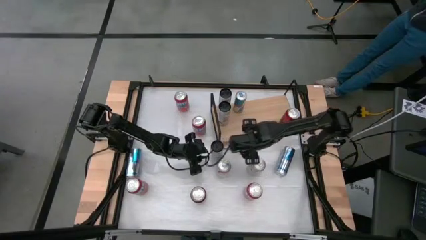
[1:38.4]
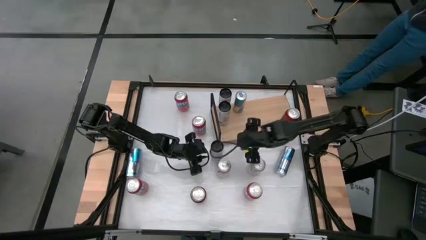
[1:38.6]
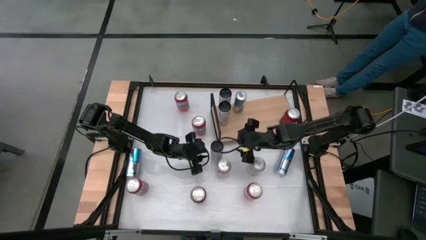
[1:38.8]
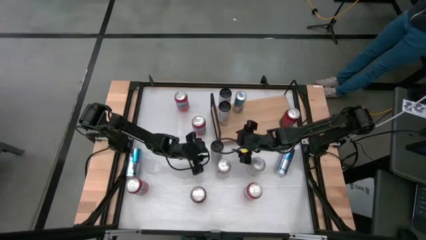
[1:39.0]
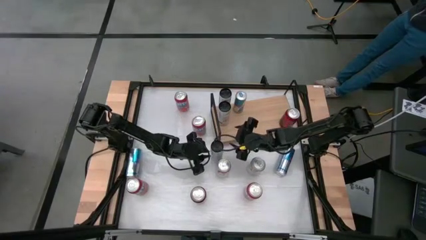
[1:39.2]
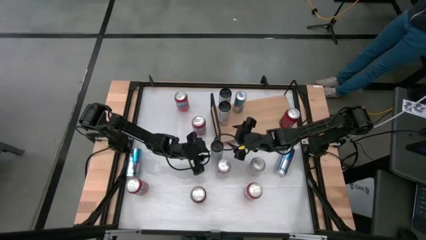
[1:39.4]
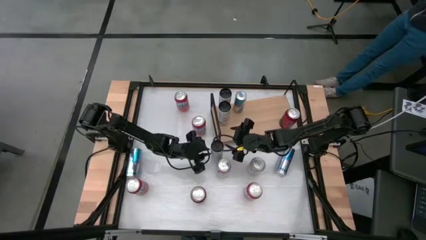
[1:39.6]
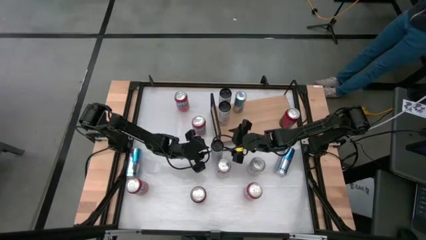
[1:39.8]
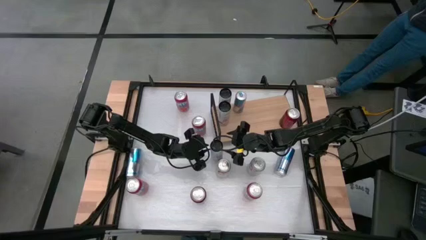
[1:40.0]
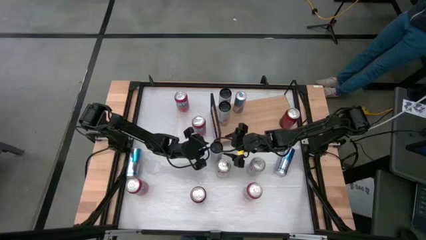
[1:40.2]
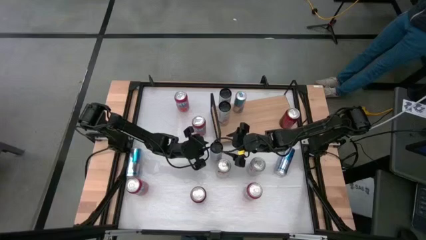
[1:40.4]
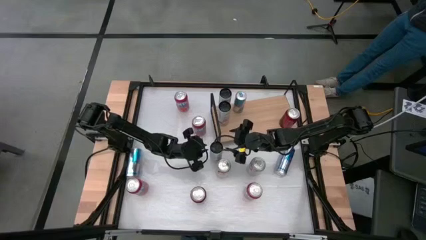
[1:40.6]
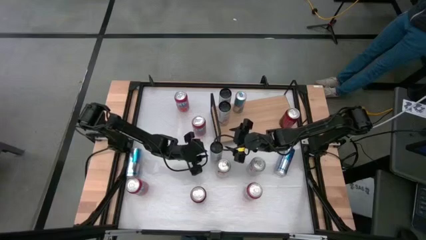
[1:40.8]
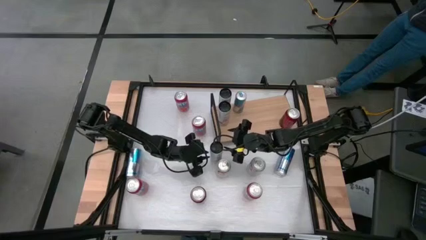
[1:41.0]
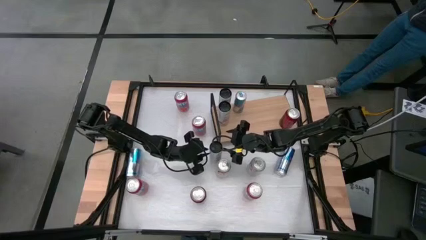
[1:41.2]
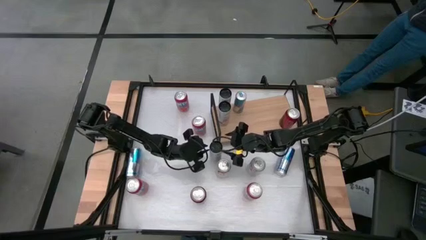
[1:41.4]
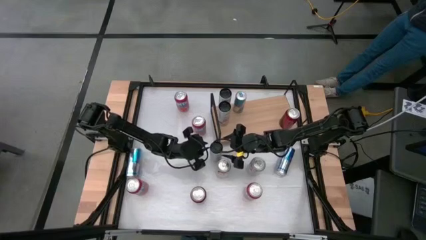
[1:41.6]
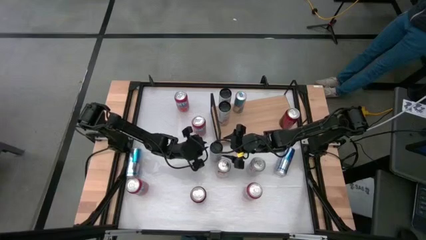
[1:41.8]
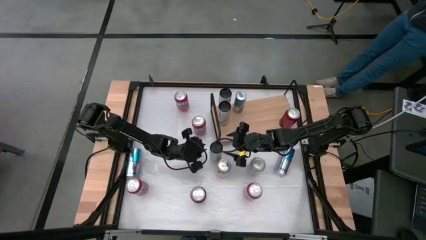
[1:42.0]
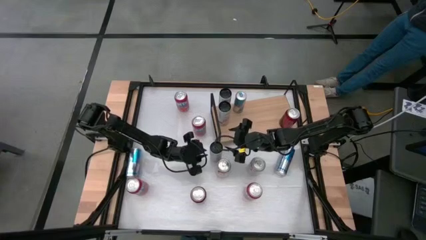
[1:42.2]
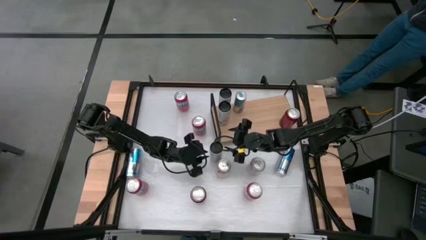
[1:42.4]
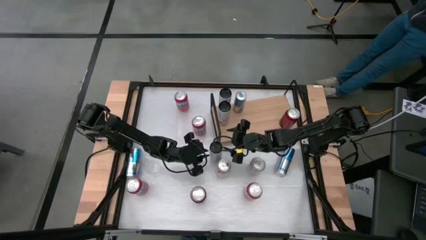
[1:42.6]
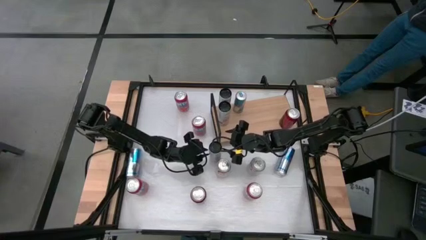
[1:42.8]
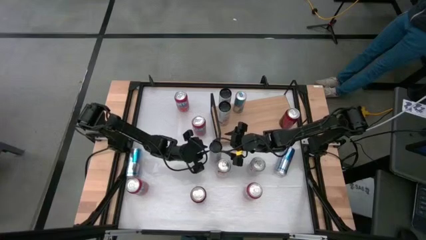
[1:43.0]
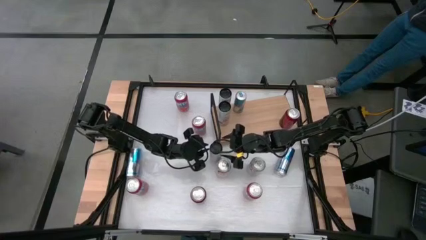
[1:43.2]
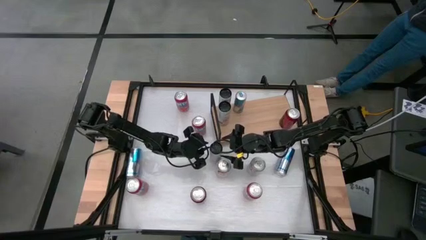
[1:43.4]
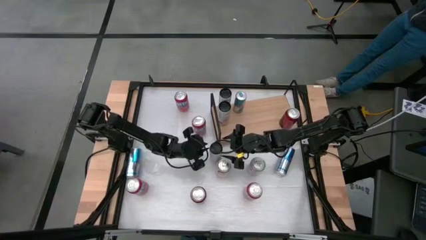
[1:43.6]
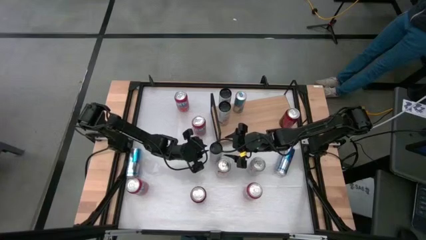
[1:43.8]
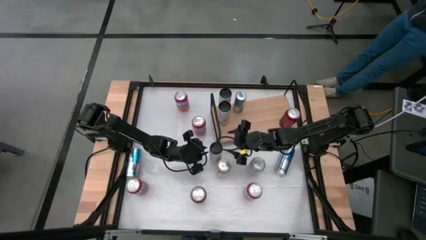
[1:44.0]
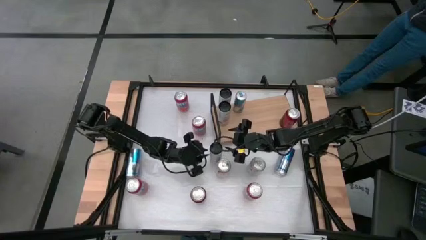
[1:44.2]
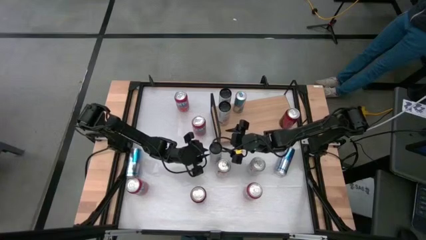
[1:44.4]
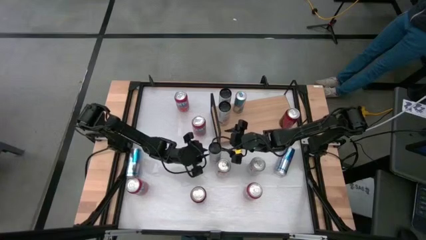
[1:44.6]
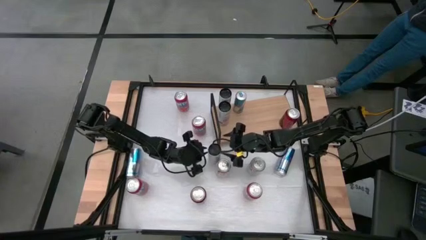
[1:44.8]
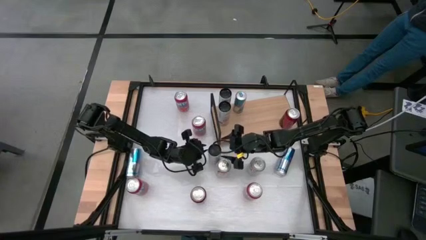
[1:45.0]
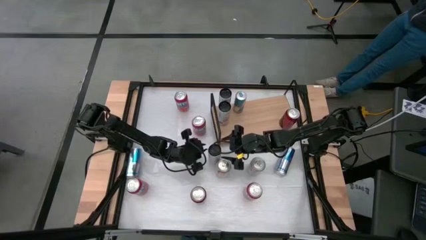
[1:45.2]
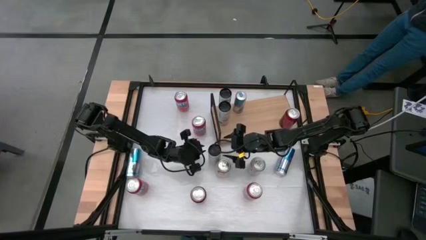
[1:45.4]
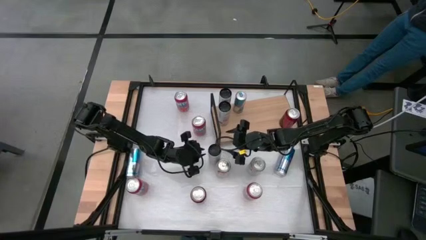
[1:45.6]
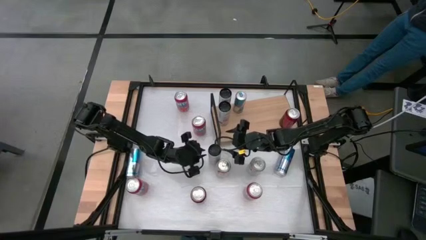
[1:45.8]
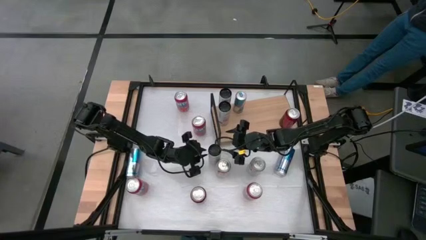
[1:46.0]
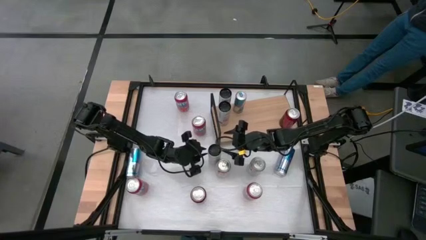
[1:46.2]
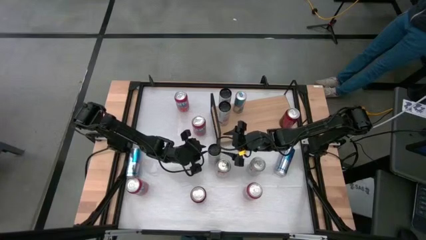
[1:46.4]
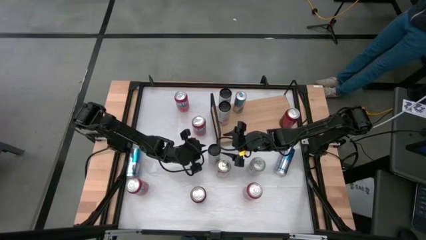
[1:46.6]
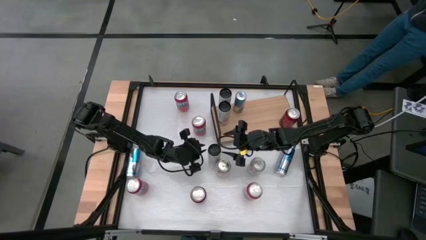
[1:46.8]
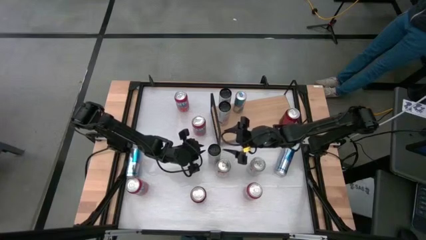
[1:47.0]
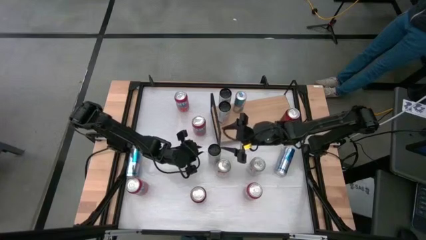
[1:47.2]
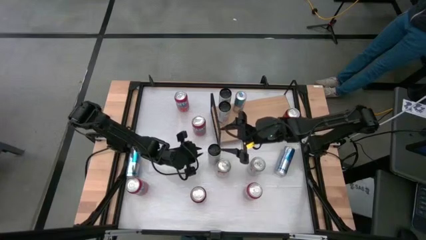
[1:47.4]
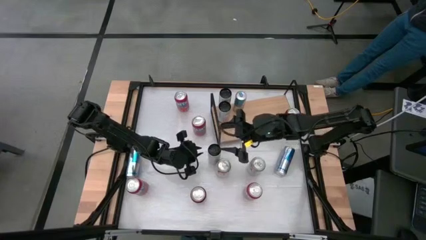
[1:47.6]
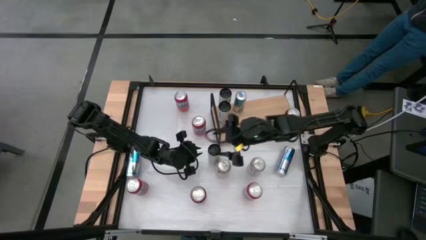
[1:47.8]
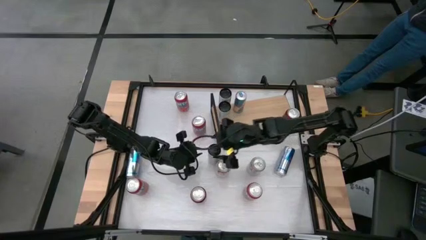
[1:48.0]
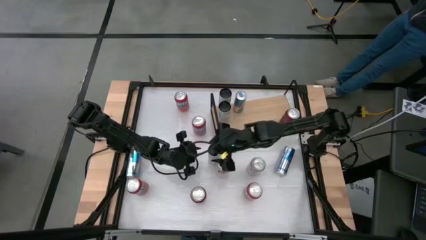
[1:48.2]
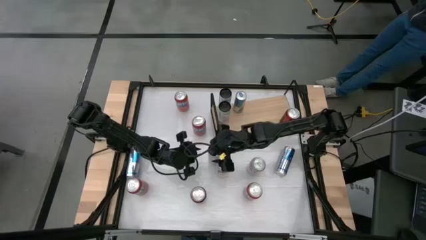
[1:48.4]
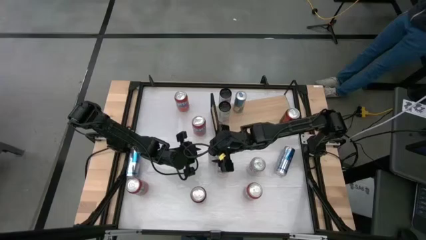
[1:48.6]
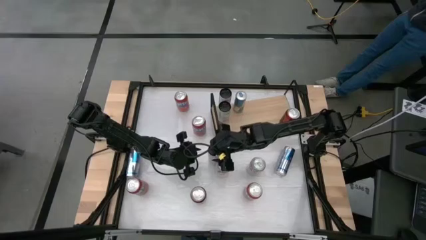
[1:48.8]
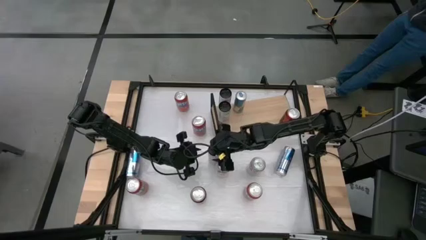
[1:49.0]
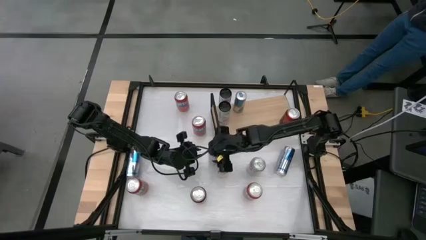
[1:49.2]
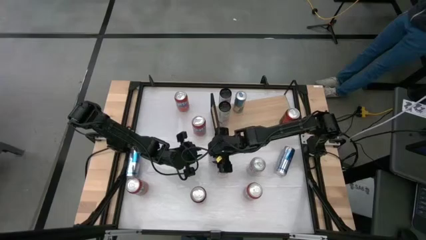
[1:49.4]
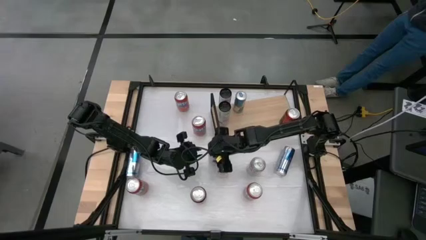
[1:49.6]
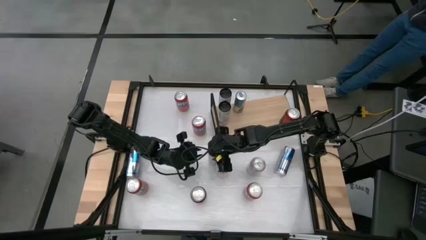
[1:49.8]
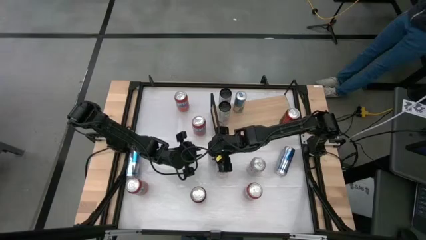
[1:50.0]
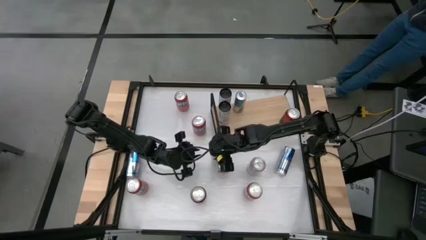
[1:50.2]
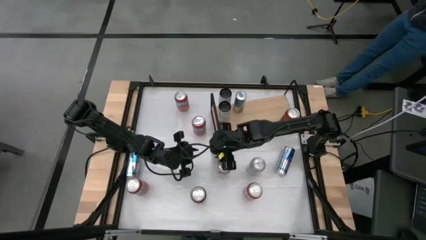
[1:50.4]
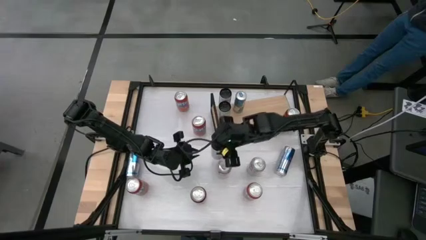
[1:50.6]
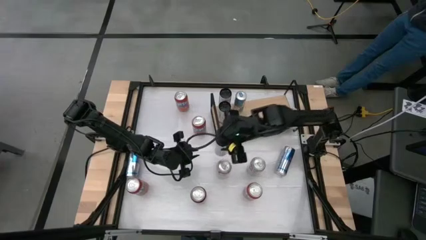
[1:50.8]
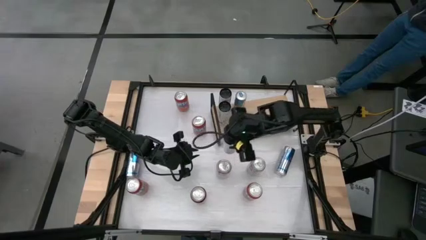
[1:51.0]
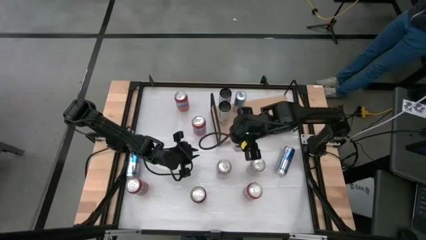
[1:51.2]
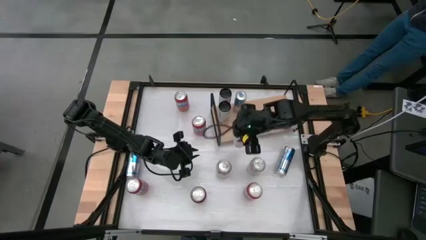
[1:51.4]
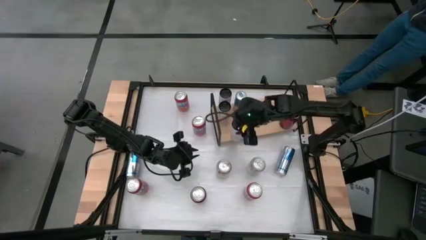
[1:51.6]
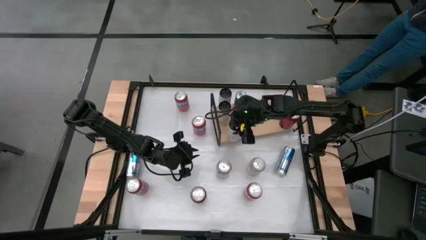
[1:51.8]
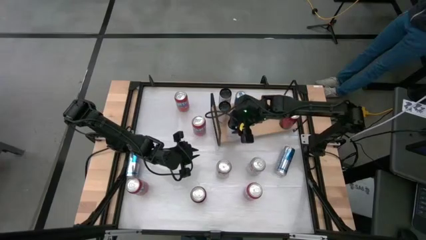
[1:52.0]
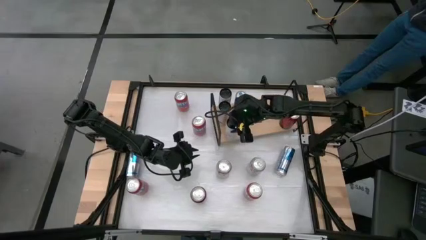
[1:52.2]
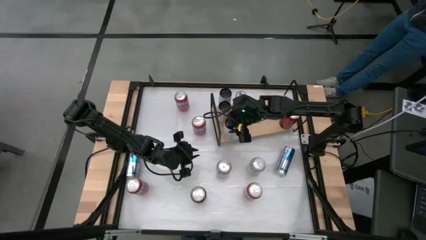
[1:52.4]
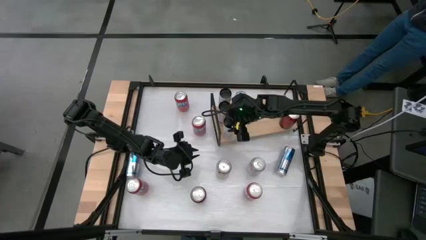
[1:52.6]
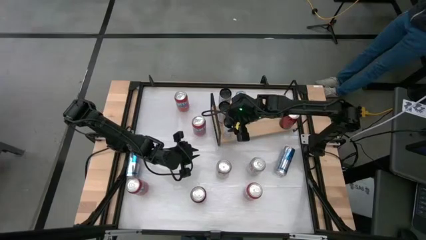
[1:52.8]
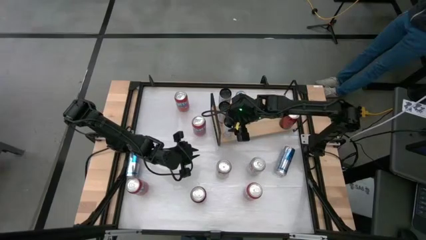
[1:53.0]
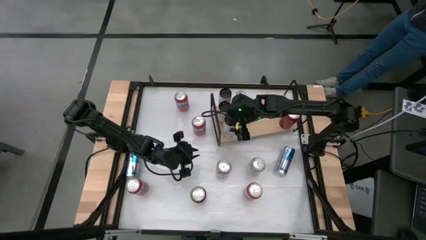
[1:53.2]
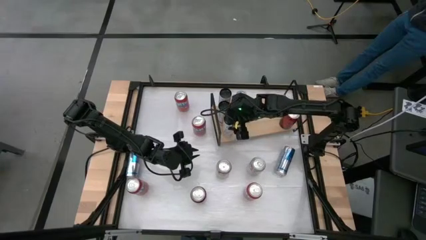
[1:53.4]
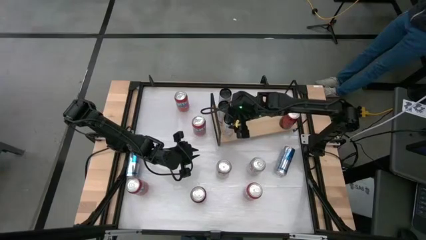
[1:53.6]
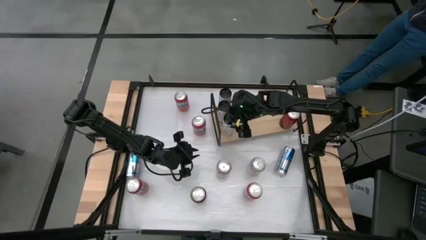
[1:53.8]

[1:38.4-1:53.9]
Task: Place canned beverage on shelf
Put the white black soda can on the shelf aligned with the other white black soda cans

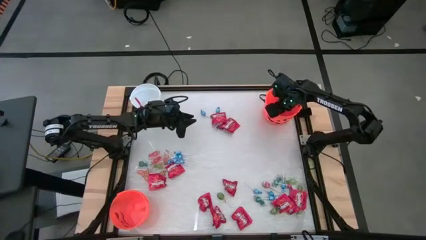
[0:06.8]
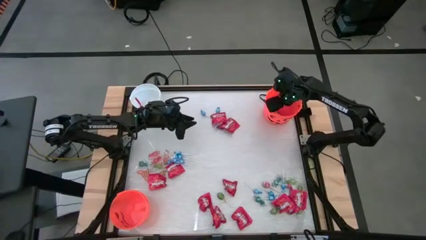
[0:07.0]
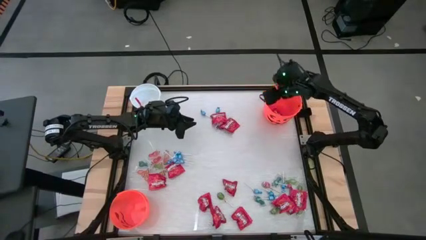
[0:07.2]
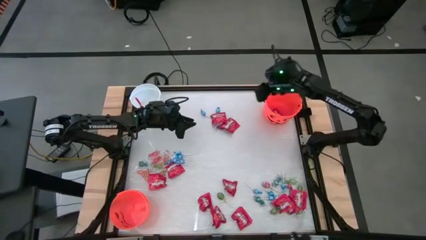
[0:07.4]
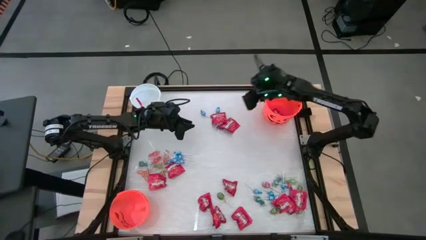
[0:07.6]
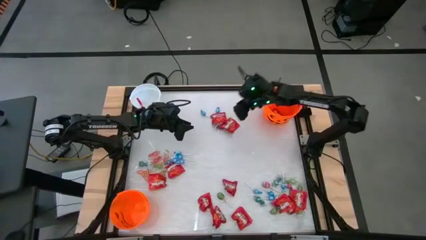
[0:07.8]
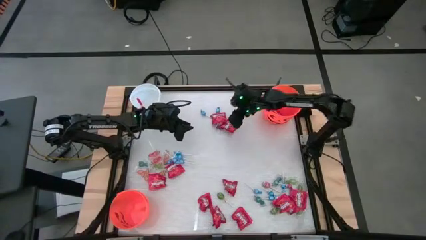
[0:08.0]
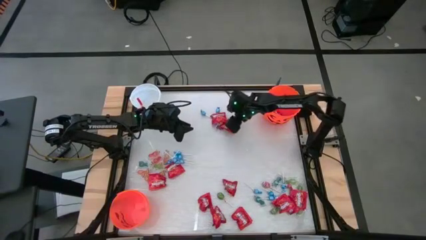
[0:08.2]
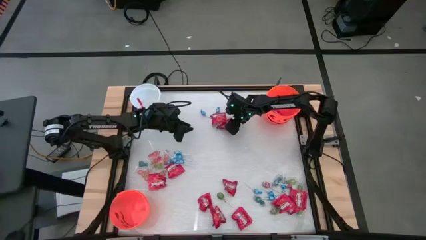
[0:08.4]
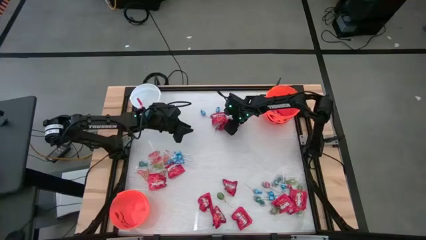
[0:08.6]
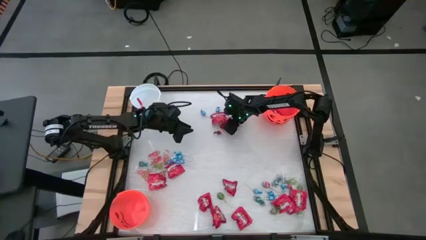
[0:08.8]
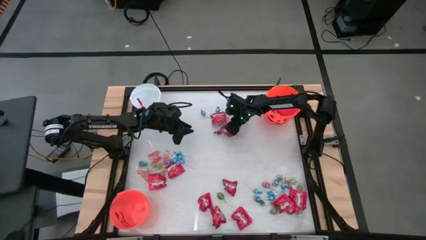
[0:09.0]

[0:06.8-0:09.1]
Task: Sort candy by brand, put in halloween buckets
Put the red candy into the top orange bucket
